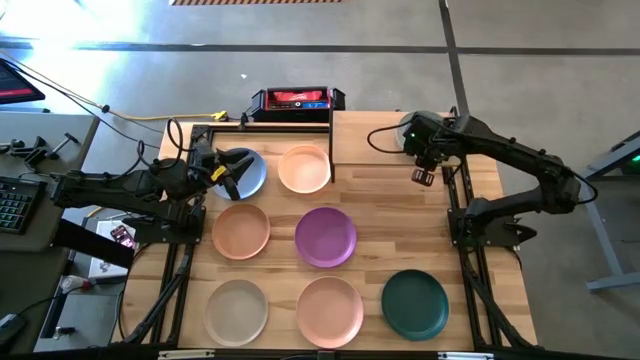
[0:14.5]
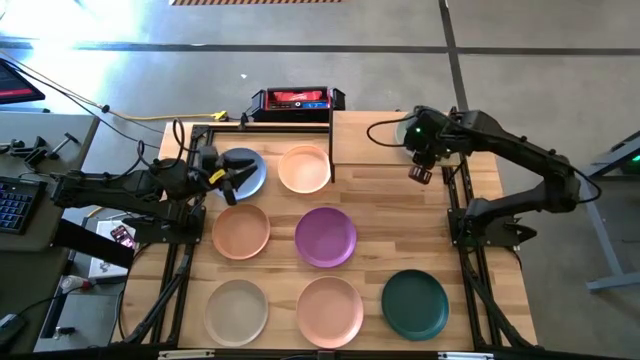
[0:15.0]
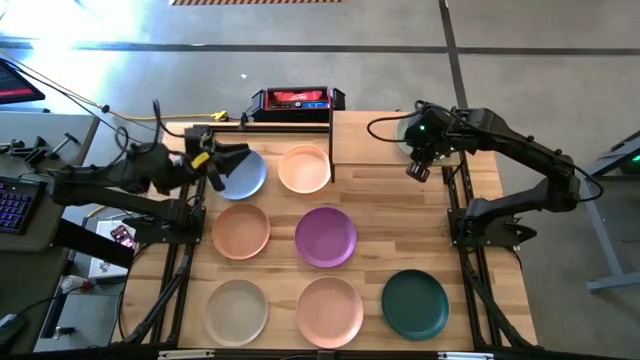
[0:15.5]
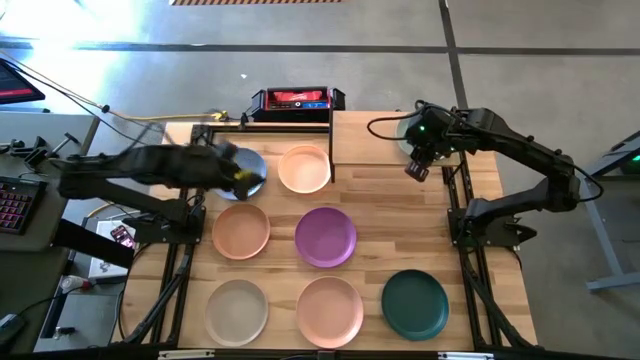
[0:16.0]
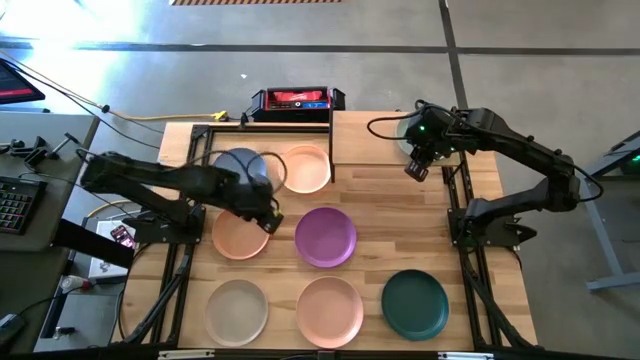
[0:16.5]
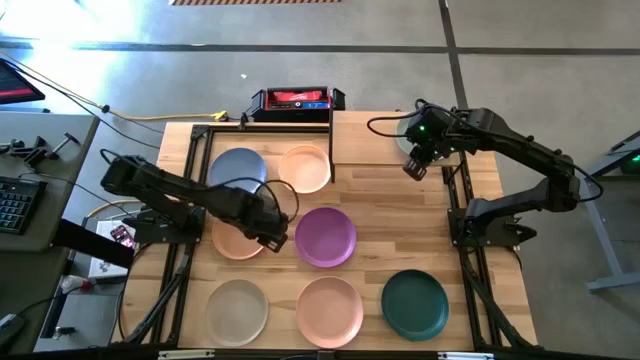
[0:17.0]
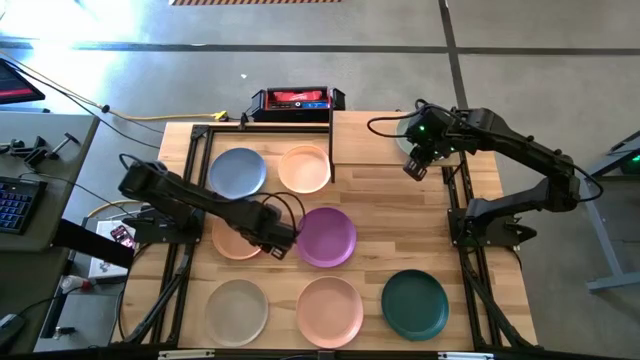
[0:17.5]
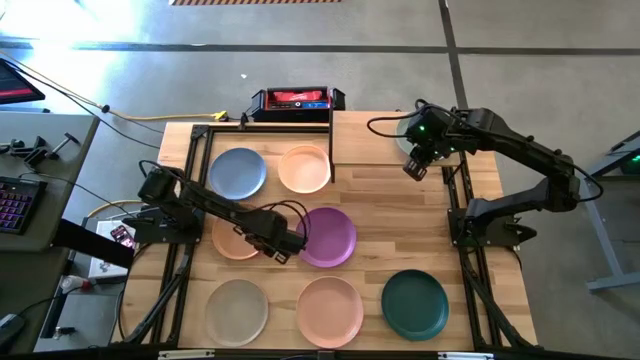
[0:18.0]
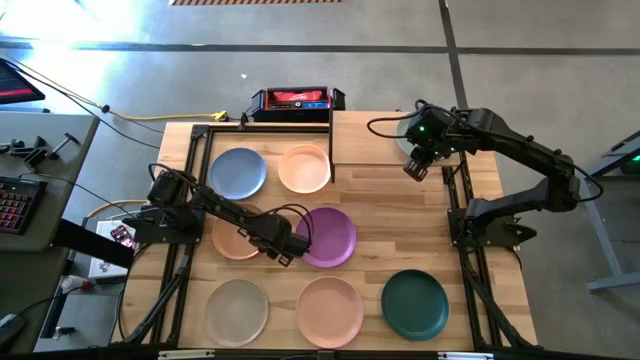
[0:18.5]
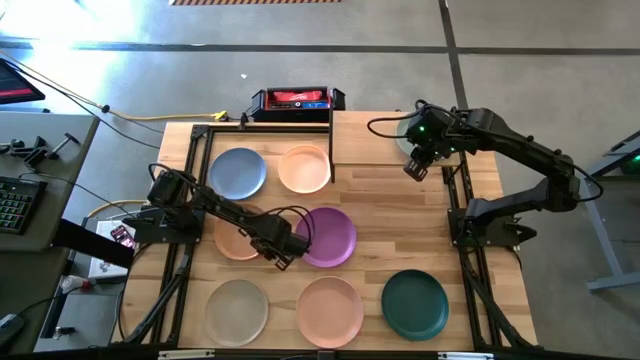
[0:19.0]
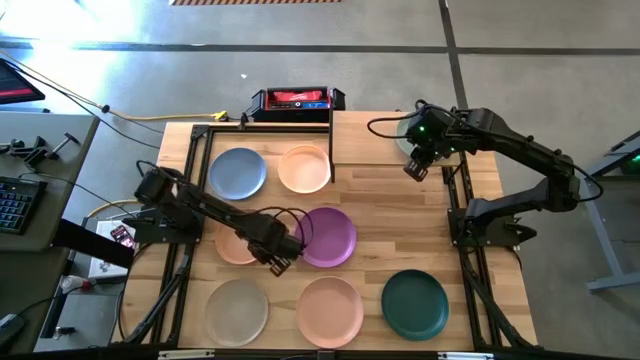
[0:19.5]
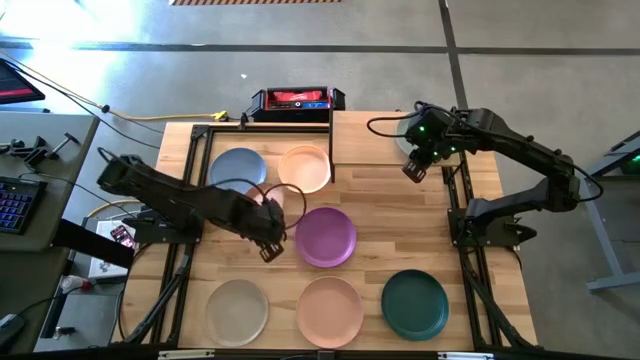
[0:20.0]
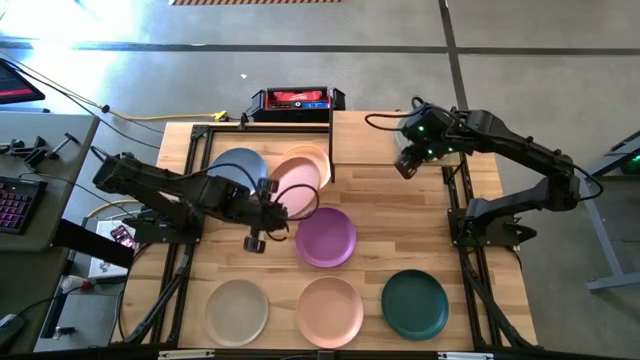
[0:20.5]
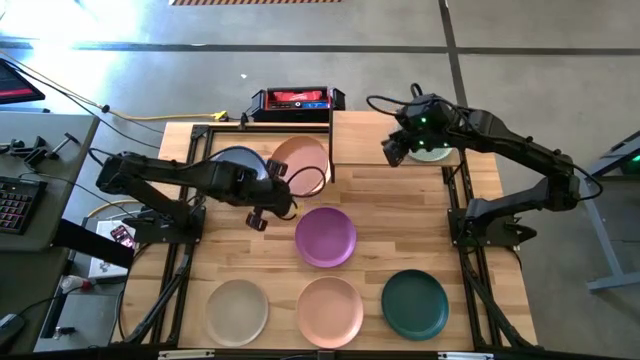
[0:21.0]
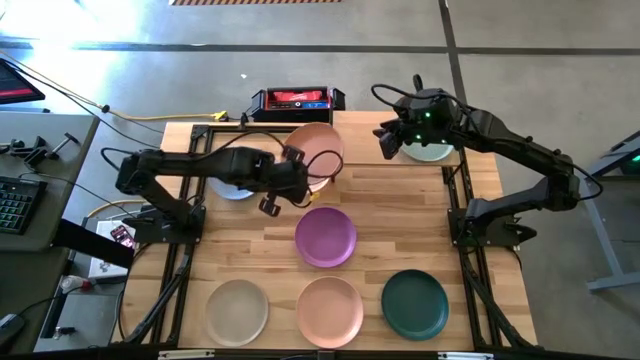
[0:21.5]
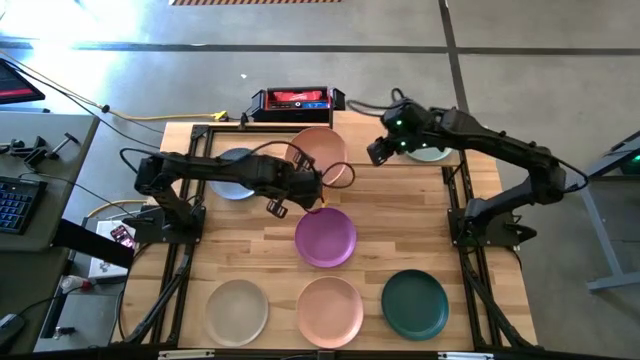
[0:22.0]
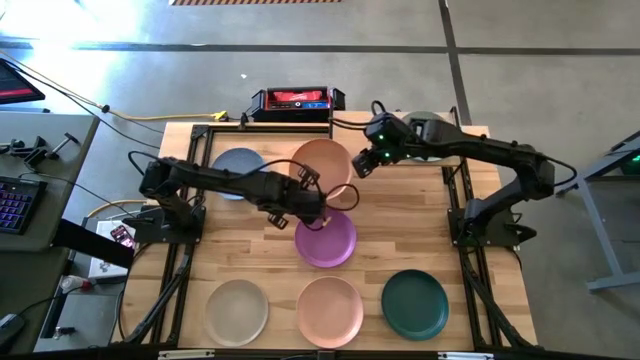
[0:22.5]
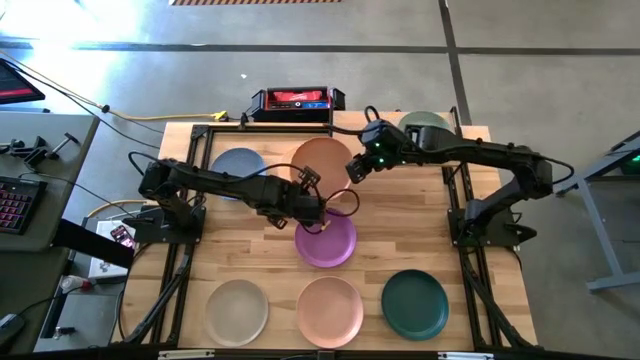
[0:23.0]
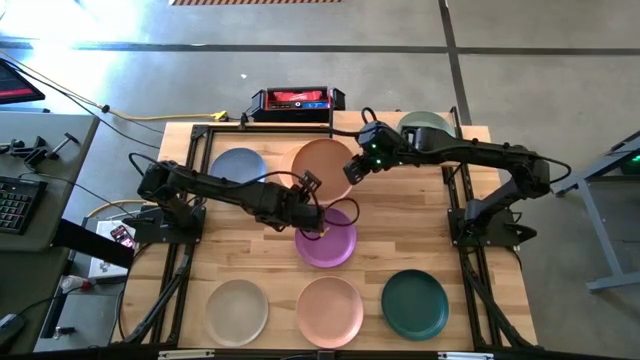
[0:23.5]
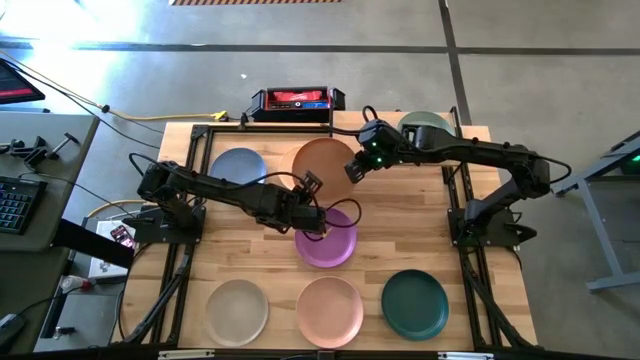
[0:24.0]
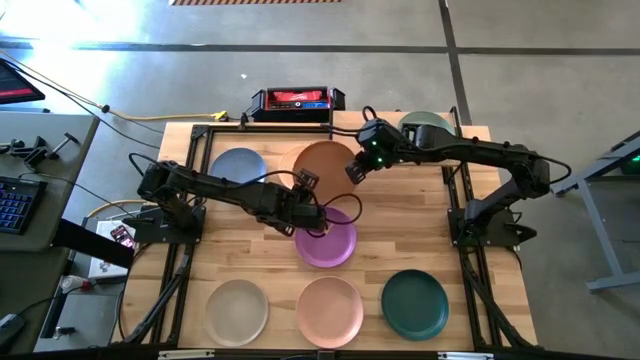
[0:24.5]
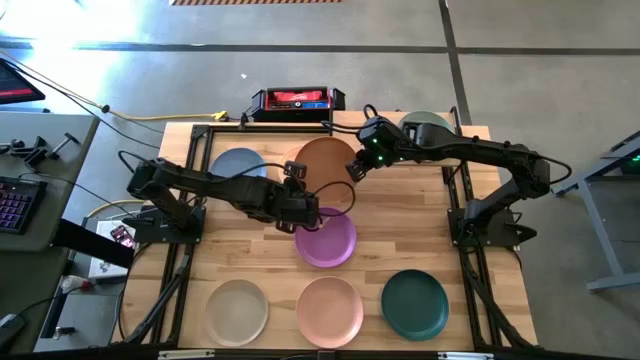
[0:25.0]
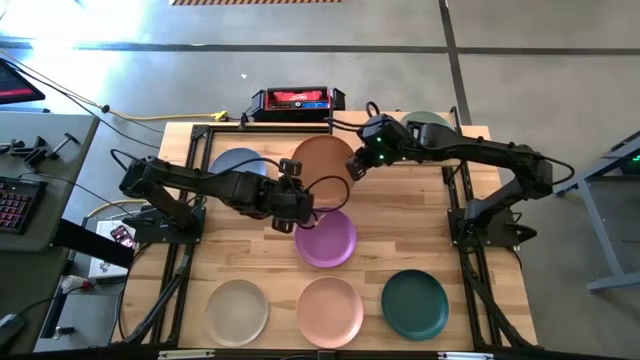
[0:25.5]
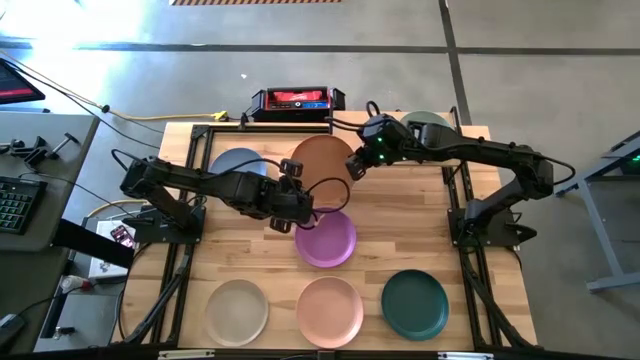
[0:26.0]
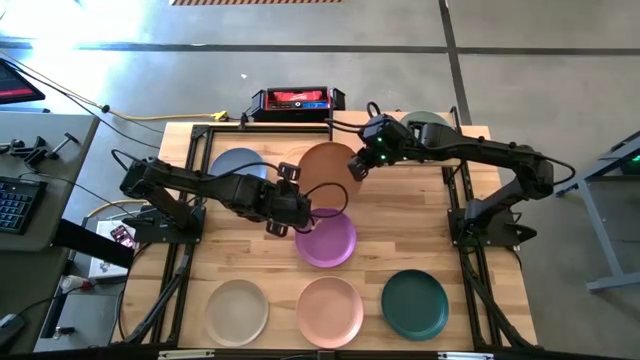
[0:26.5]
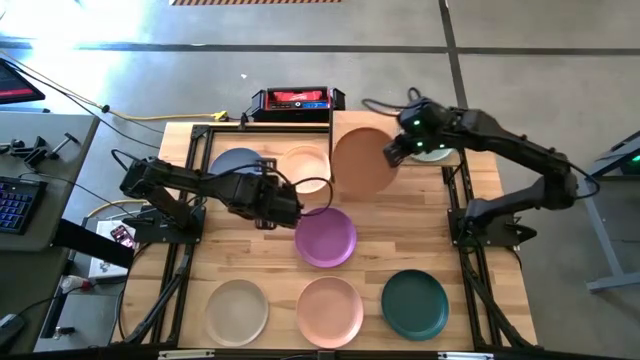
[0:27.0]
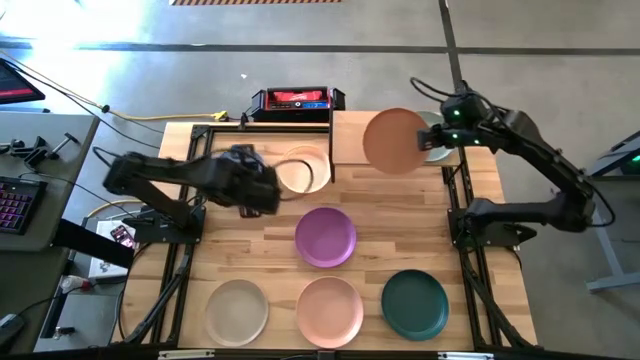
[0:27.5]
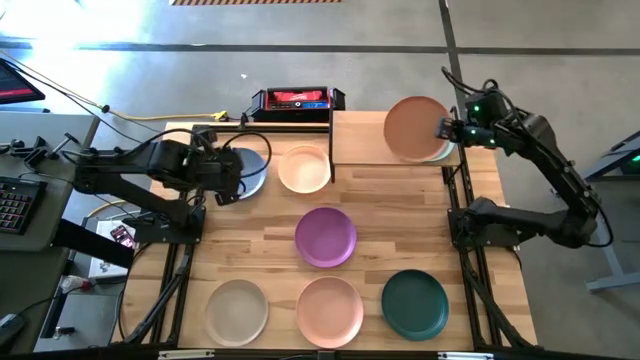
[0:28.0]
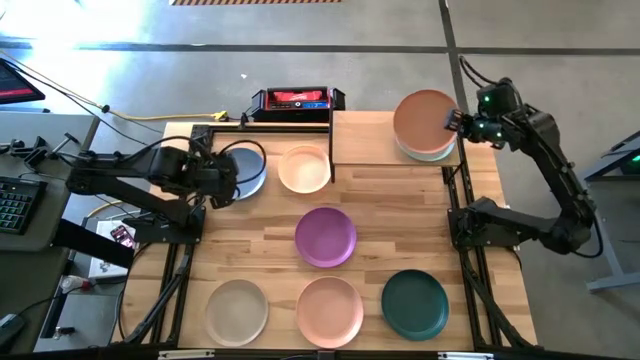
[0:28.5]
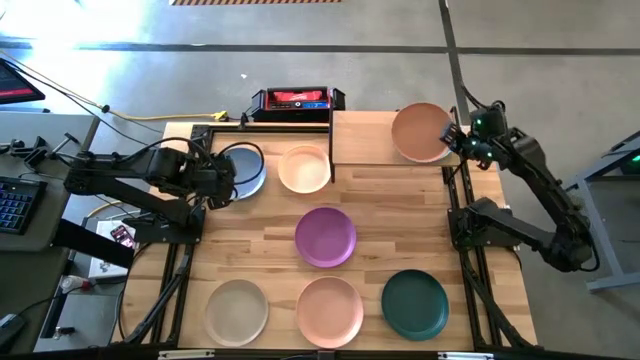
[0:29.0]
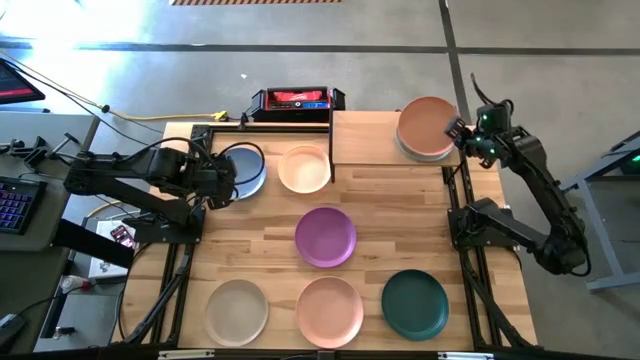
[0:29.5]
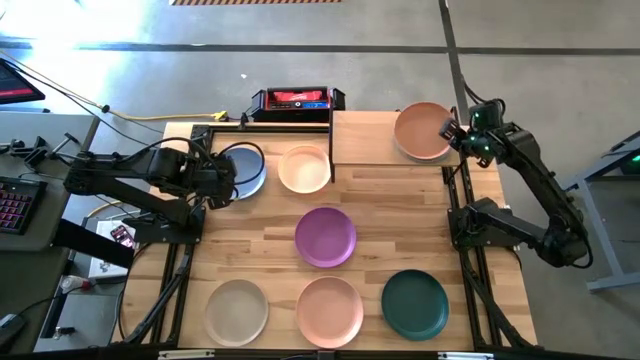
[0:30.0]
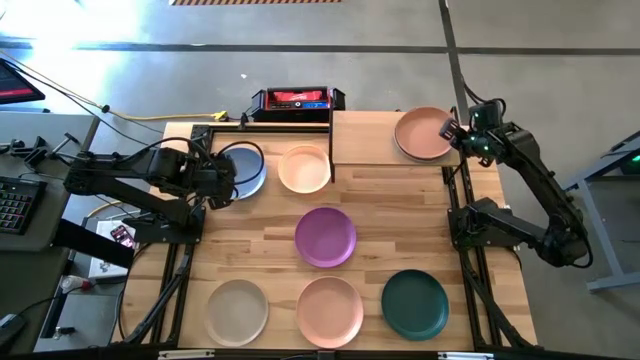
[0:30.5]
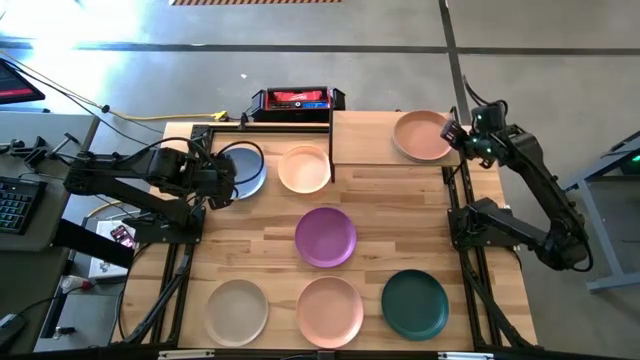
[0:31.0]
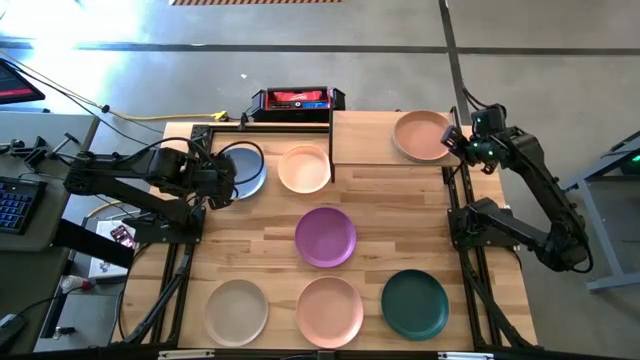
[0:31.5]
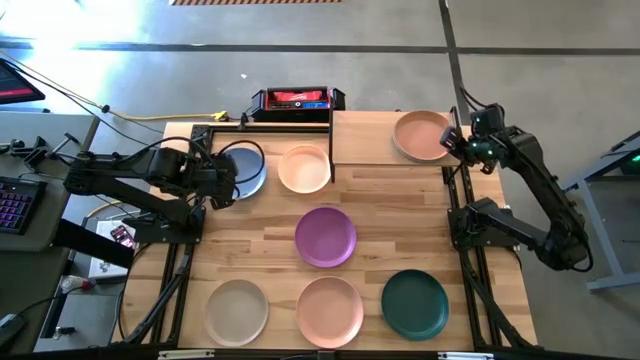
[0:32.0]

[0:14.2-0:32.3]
Task: Place and stack plates onto a shelf
Stack the brown plate on top of the light blue plate on the shelf

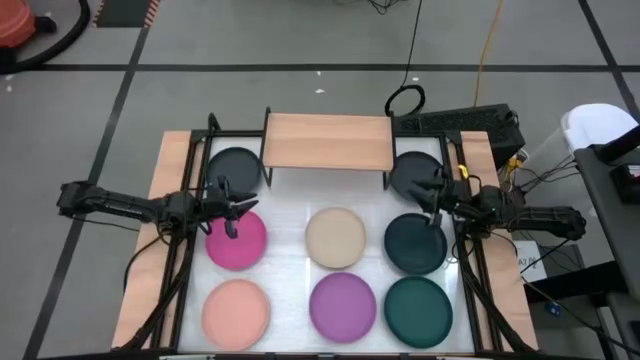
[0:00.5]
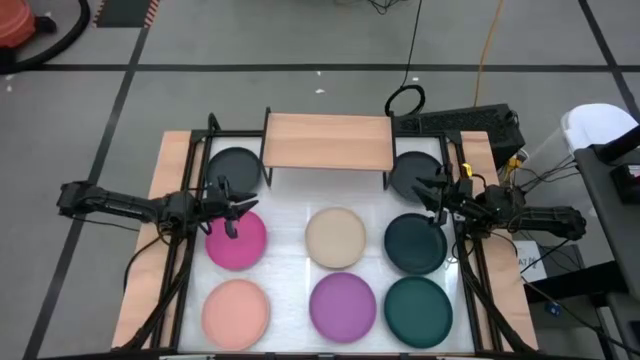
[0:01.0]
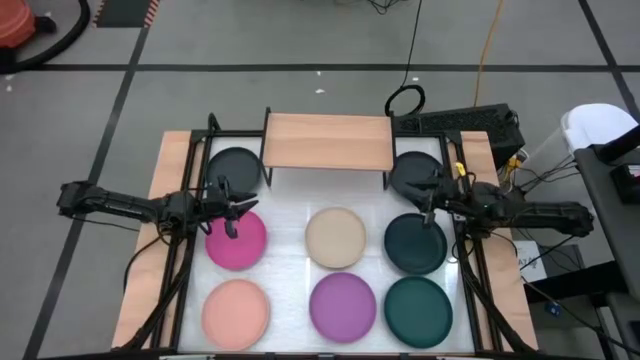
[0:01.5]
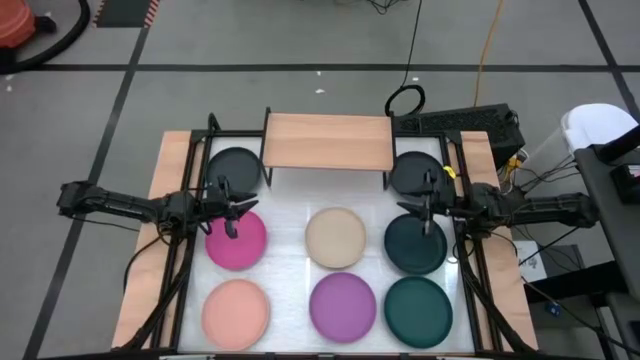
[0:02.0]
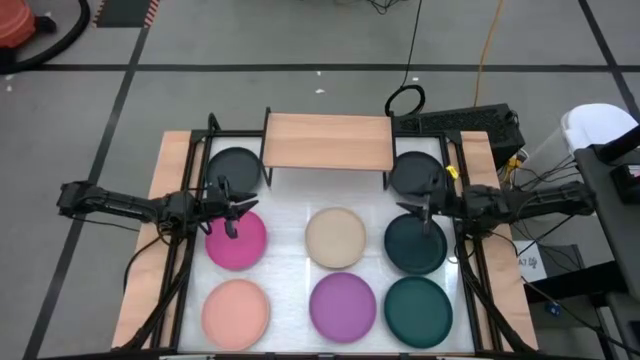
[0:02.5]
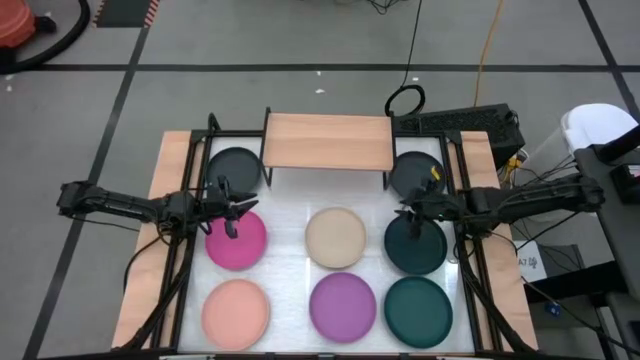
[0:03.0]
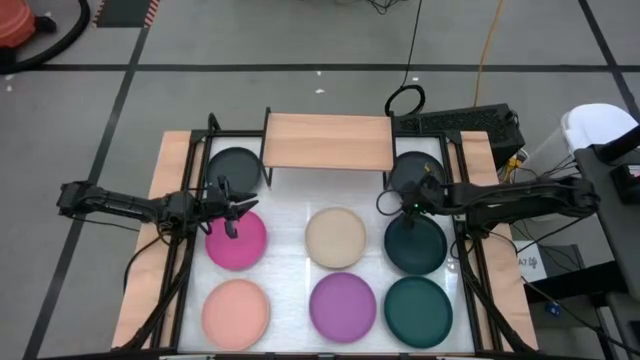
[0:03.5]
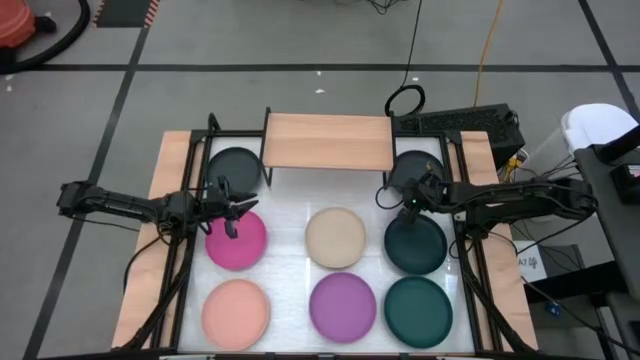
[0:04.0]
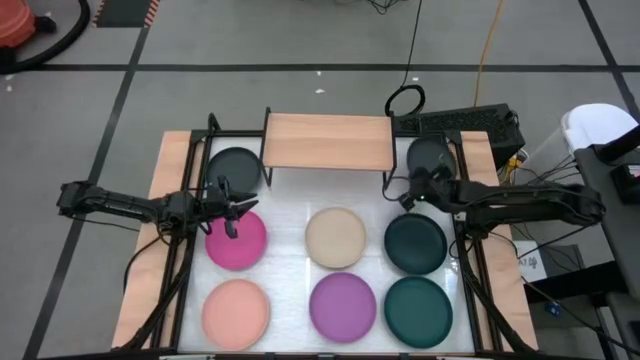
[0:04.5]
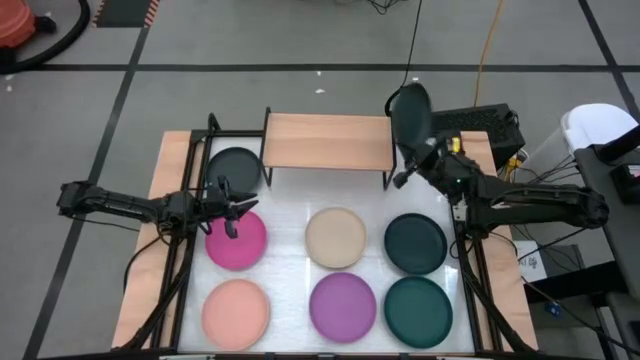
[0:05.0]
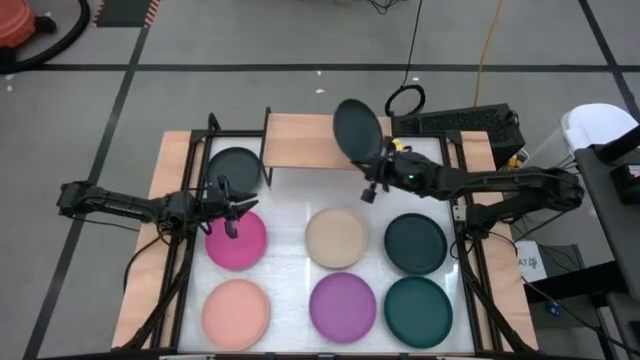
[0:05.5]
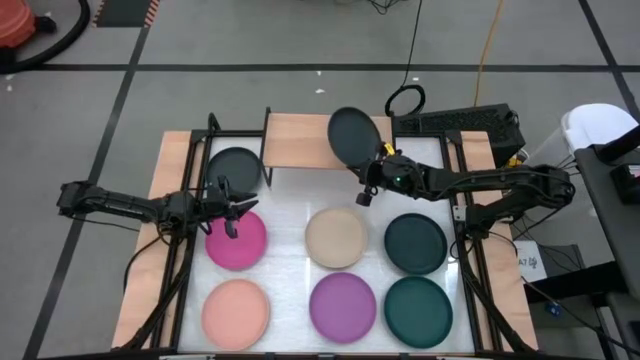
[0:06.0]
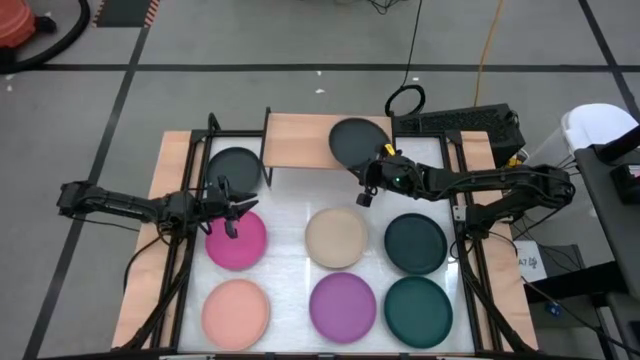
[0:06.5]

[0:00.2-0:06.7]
Task: Place and stack plates onto a shelf
Put the right black plate on the shelf
